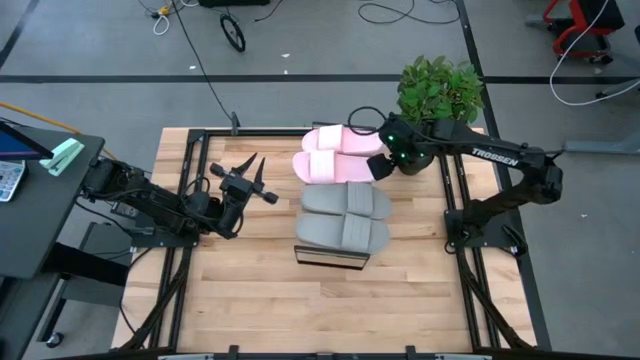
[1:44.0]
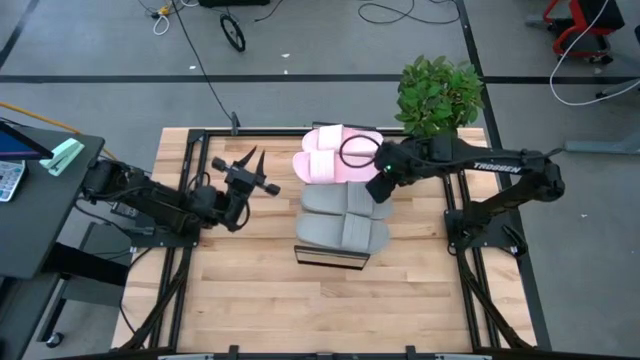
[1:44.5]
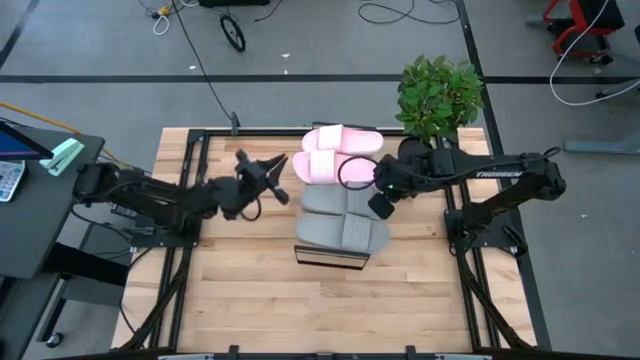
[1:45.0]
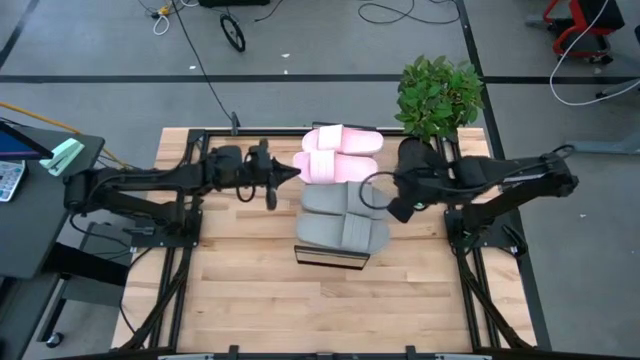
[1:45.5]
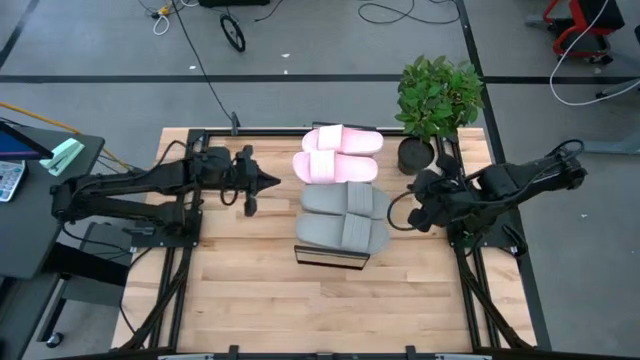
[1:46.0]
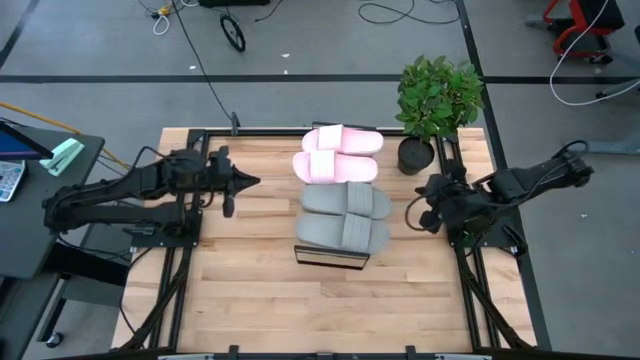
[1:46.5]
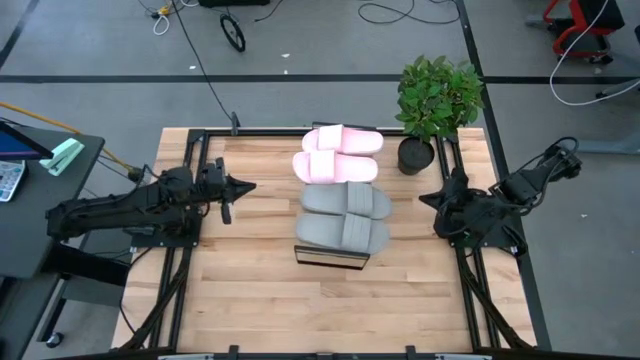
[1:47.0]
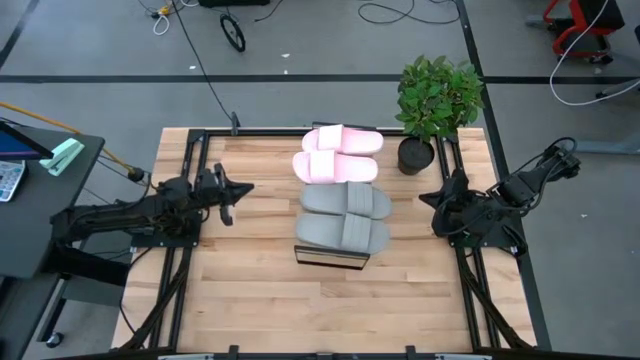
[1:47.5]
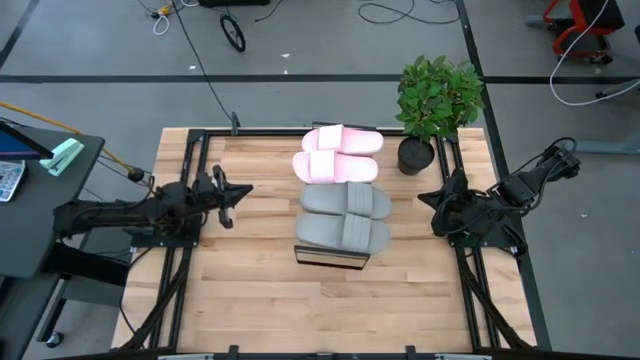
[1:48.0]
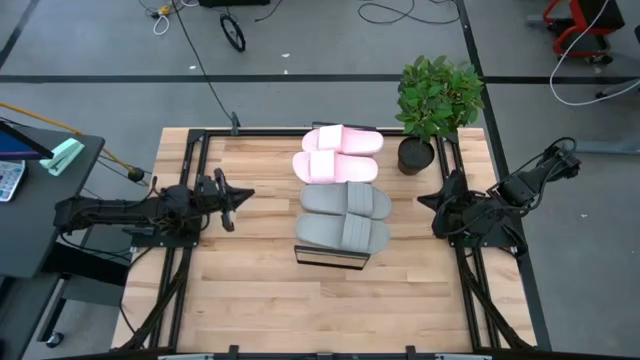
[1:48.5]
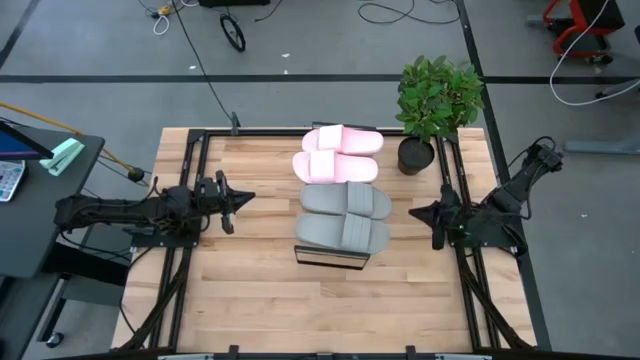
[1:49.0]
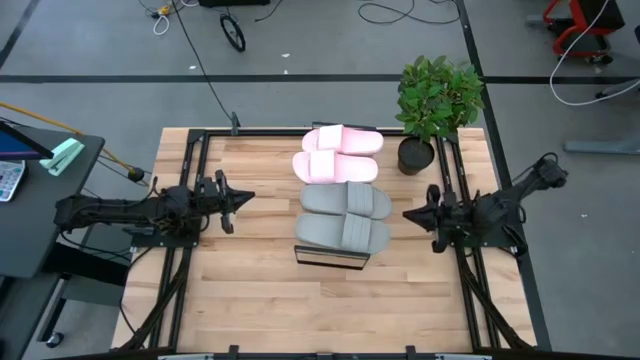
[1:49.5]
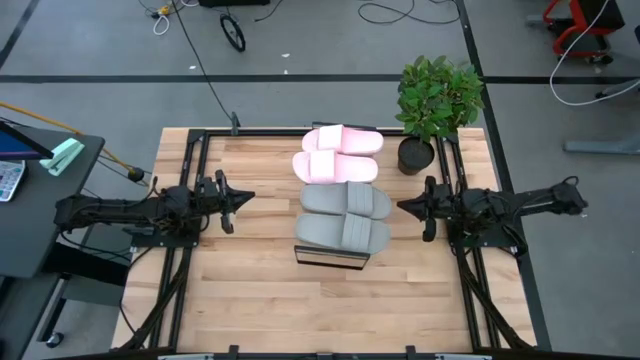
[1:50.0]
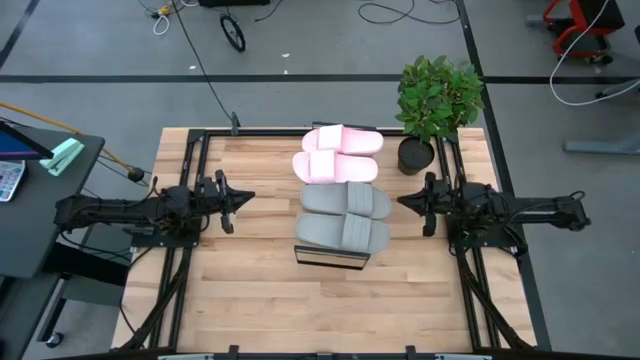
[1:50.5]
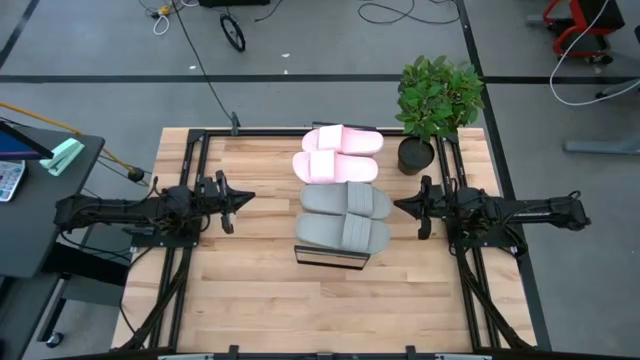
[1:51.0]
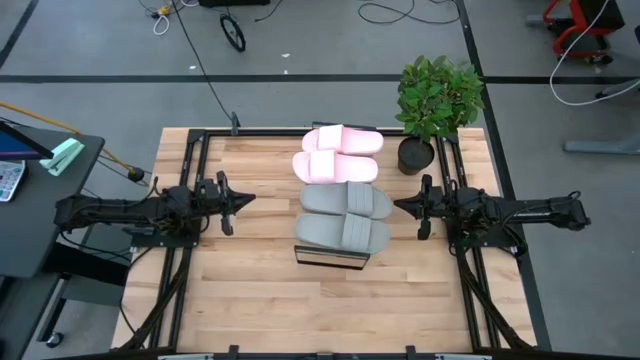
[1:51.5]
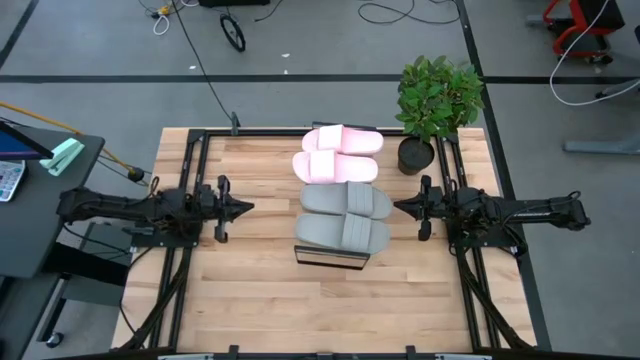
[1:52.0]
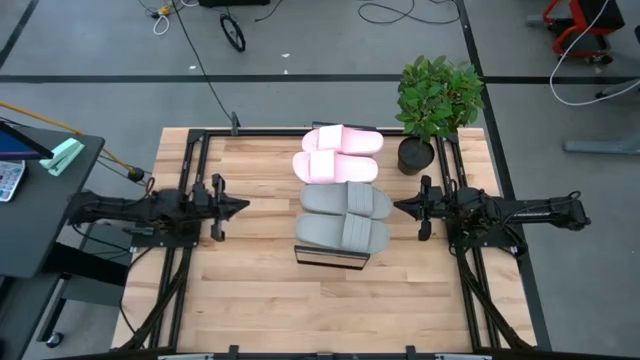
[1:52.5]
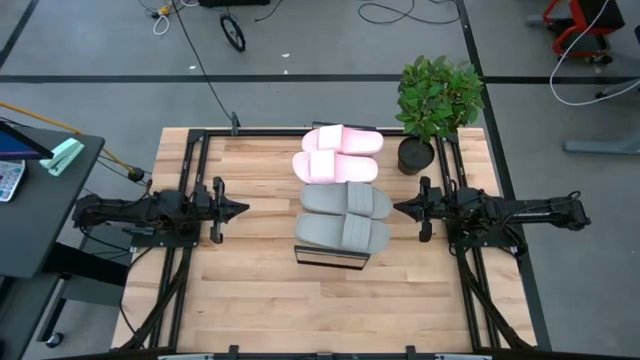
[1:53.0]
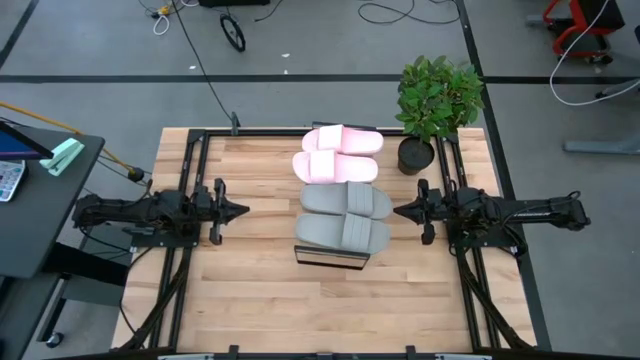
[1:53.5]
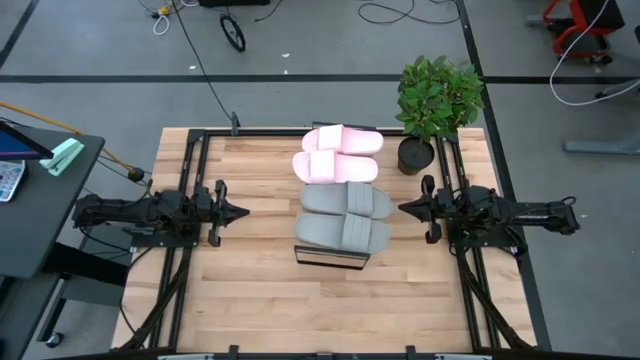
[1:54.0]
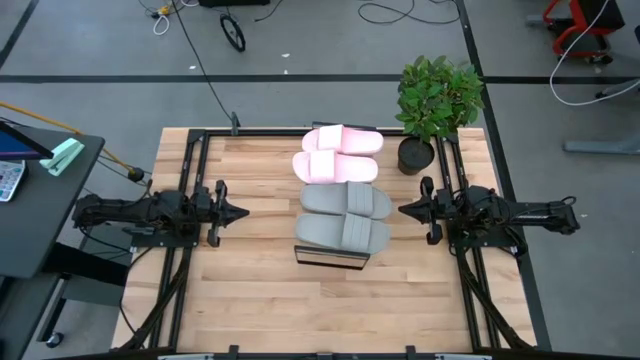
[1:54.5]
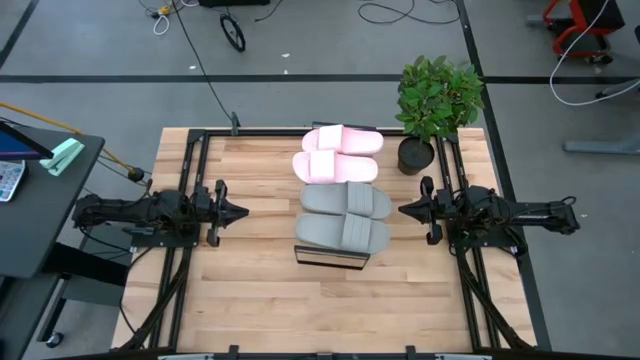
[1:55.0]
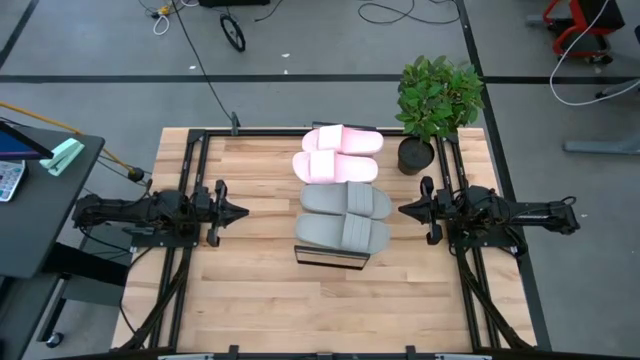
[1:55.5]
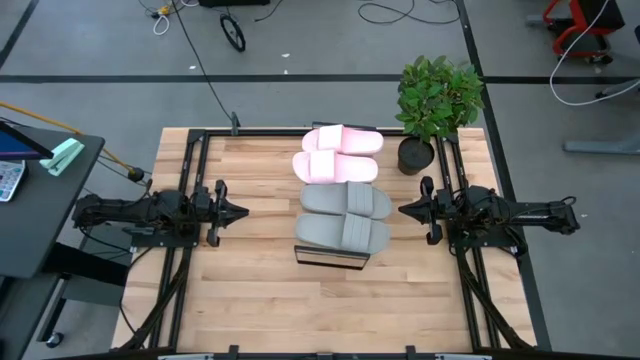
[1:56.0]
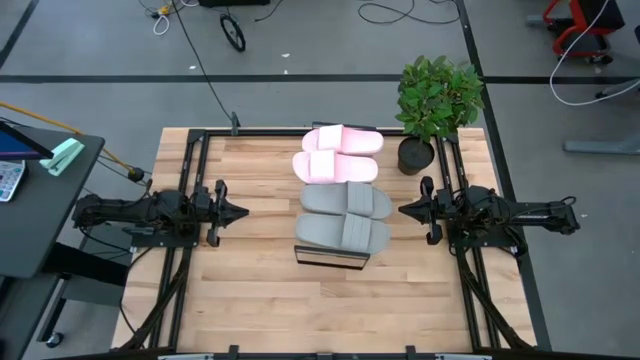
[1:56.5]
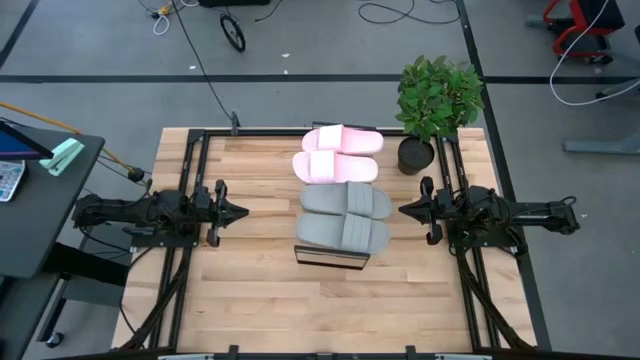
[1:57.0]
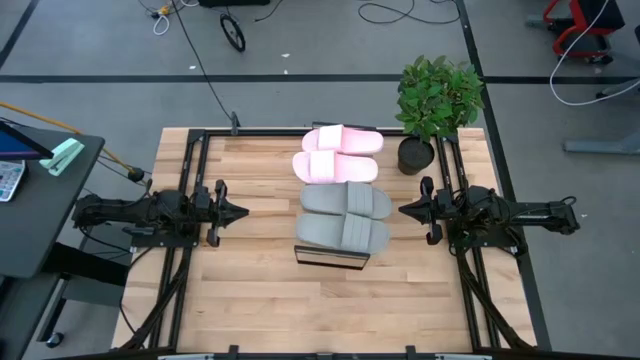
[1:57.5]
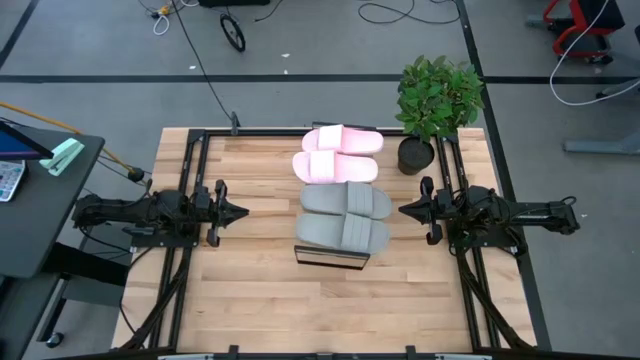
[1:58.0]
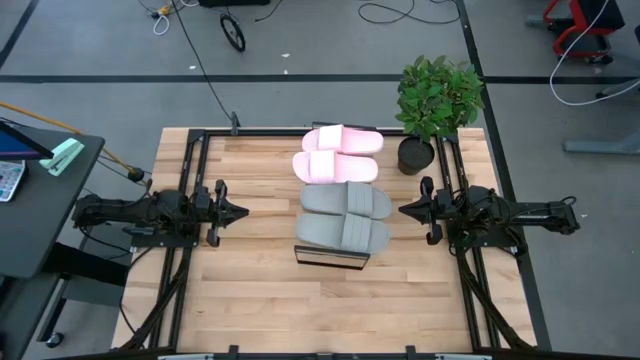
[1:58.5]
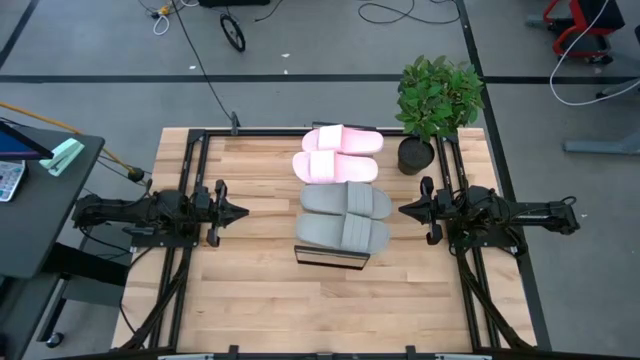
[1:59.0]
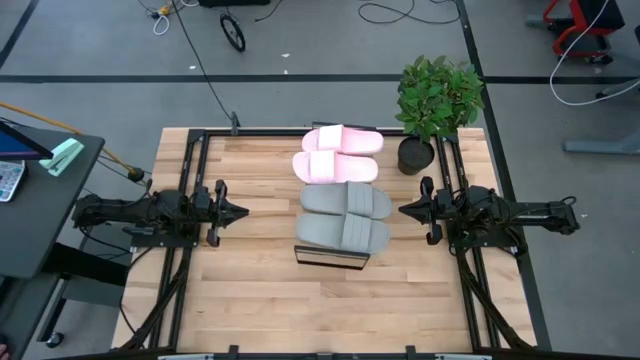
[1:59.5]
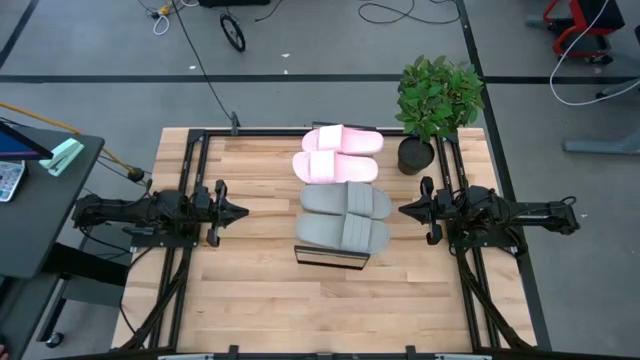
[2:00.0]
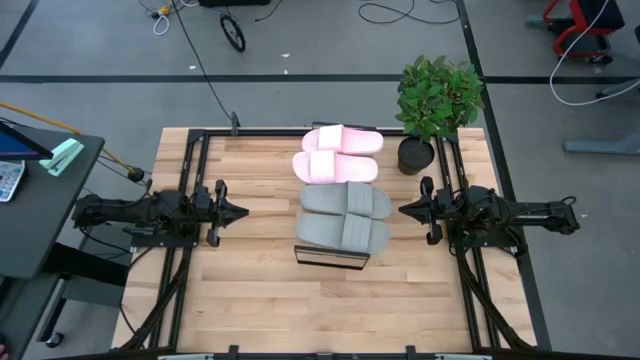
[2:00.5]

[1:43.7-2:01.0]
Task: Pick and place slides into the shelf
Return to Home Position

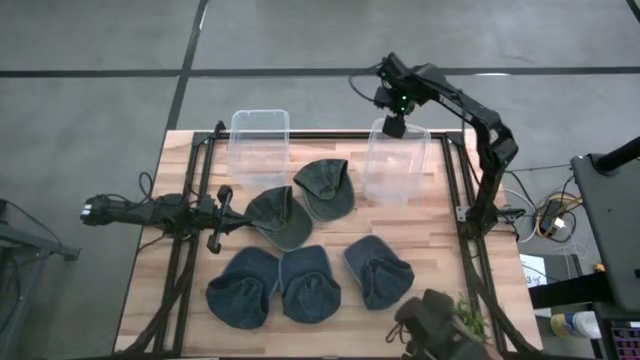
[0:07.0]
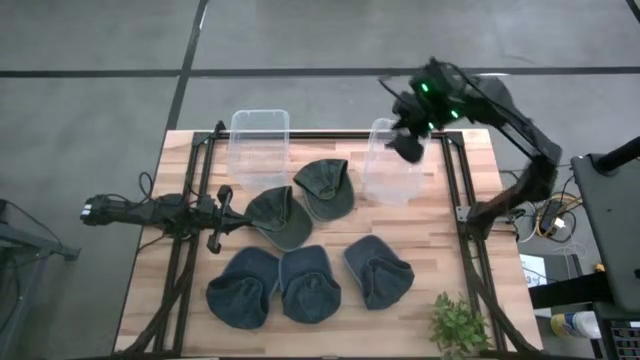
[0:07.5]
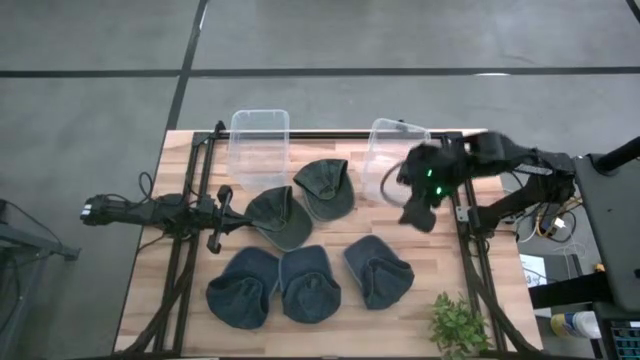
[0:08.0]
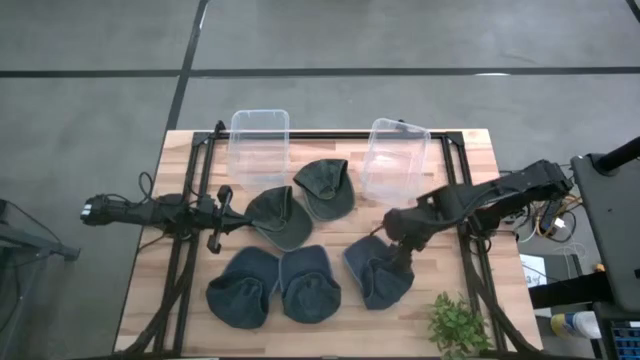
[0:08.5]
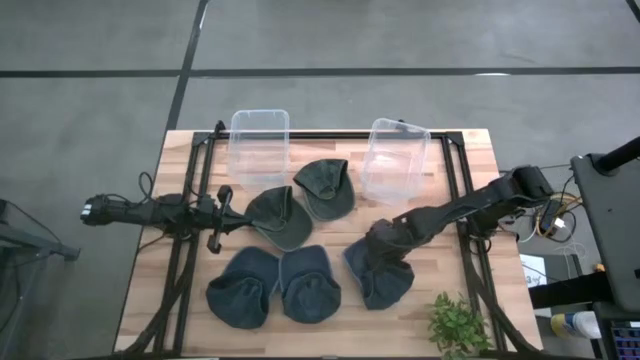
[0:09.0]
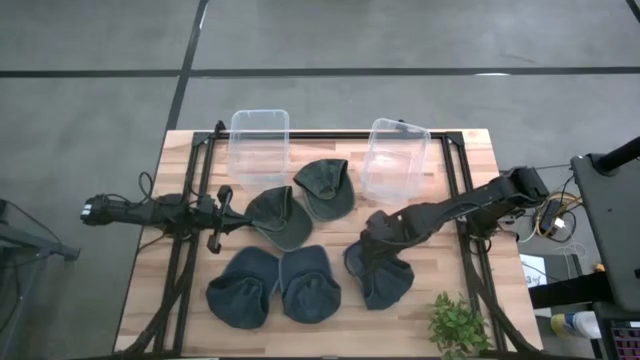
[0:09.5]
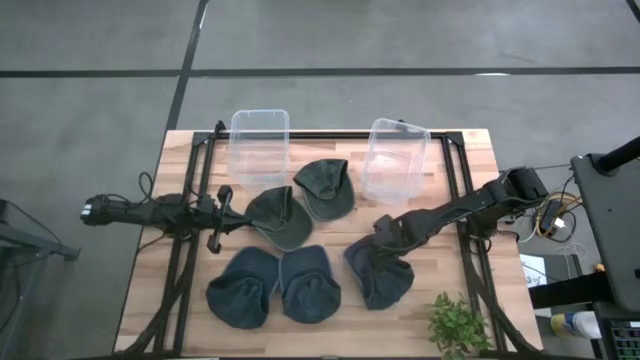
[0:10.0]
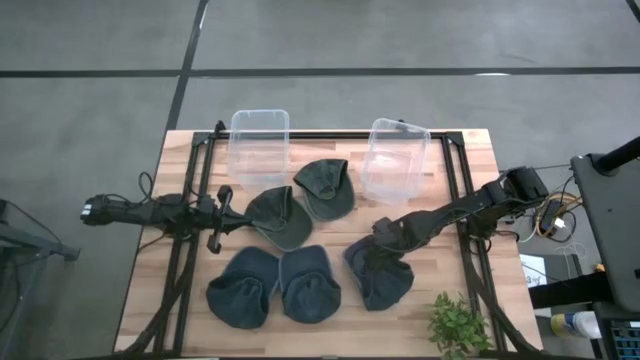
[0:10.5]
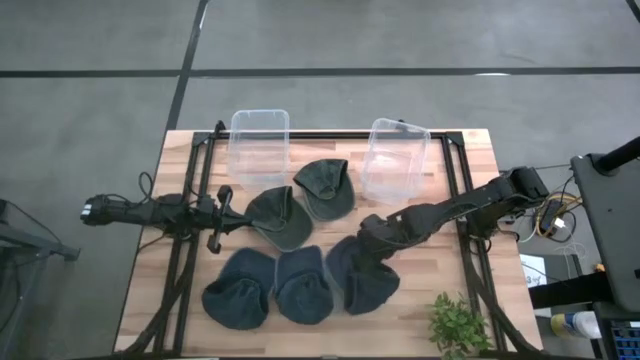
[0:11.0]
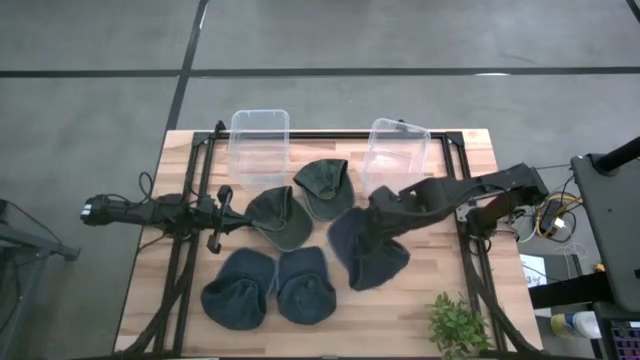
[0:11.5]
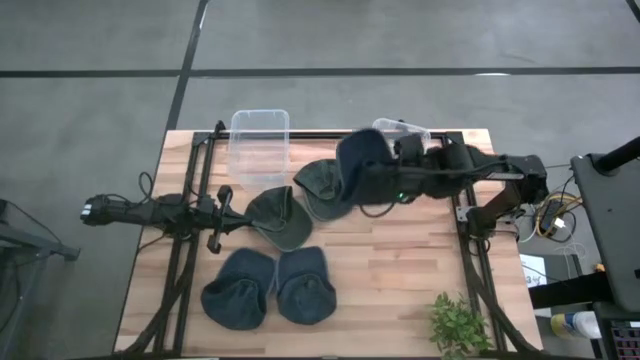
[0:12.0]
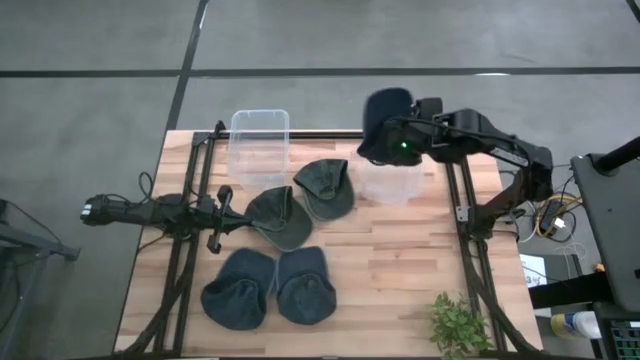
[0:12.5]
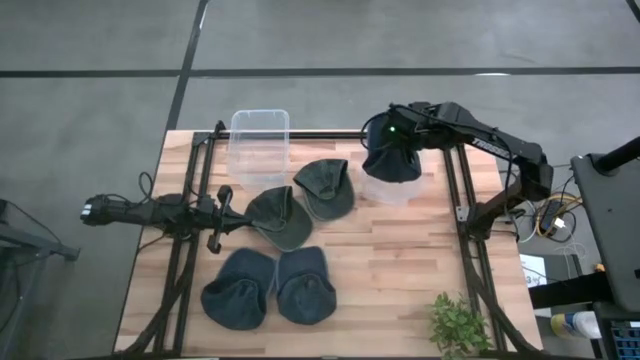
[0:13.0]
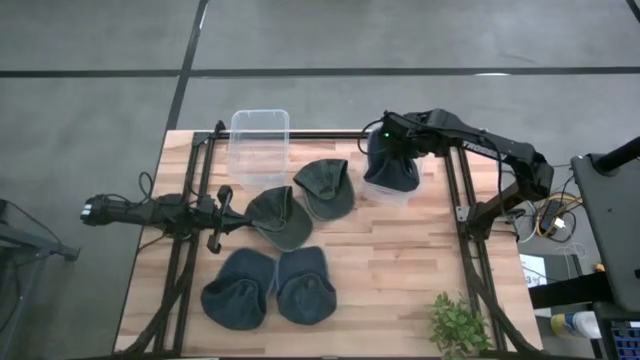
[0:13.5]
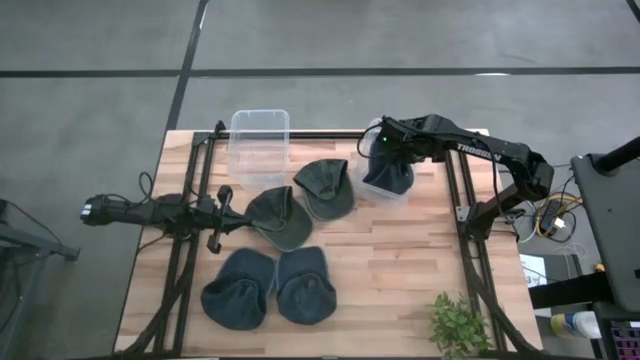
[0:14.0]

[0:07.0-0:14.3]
Task: Pick & Place hat
Put the right blue cap into the right transparent bin
